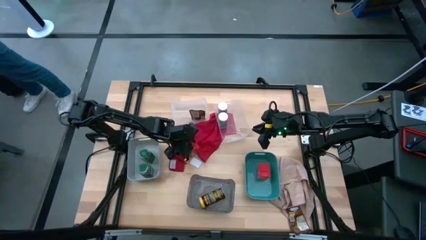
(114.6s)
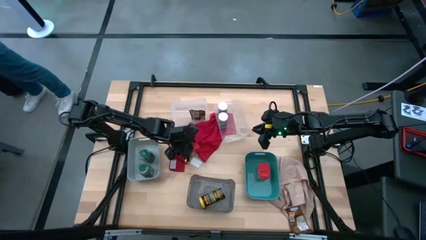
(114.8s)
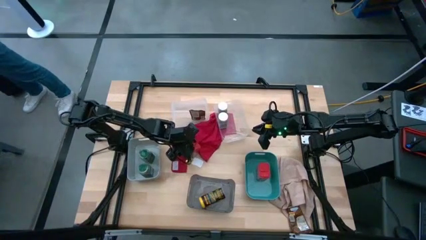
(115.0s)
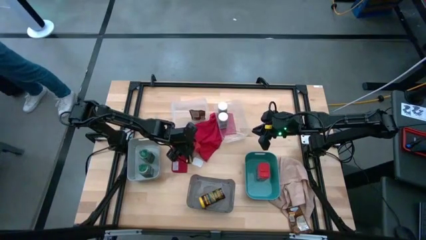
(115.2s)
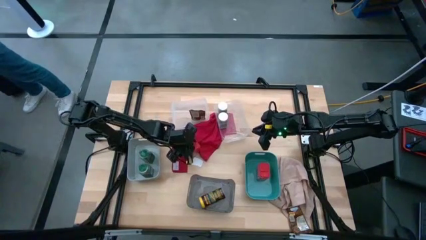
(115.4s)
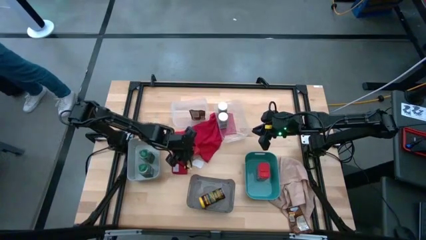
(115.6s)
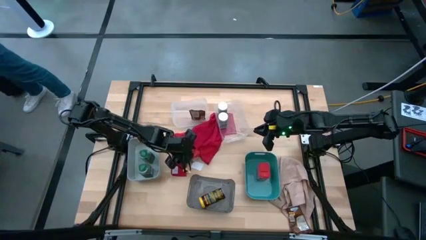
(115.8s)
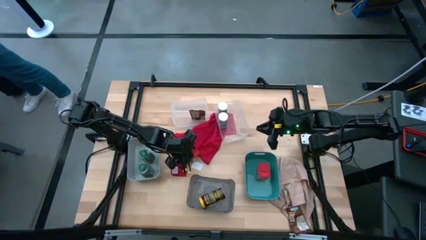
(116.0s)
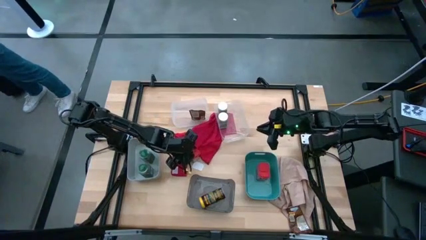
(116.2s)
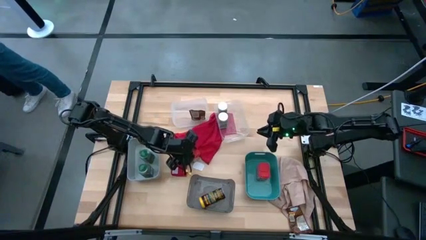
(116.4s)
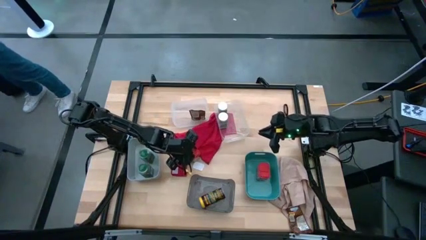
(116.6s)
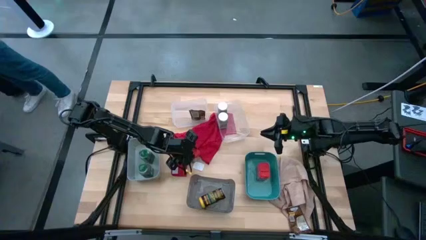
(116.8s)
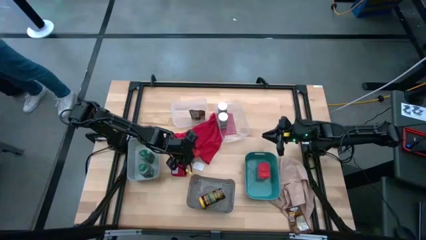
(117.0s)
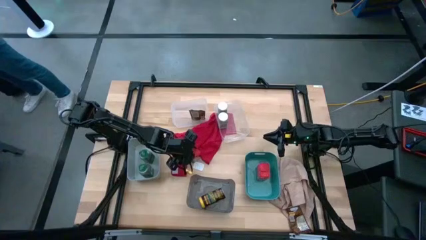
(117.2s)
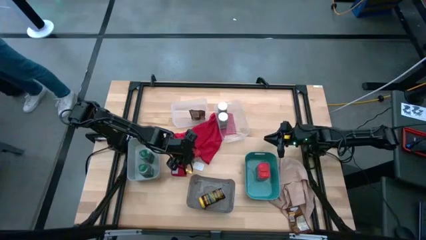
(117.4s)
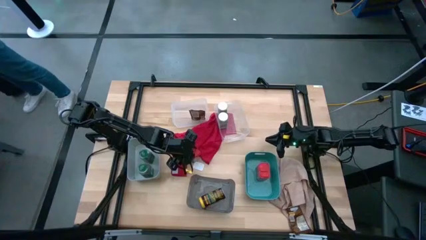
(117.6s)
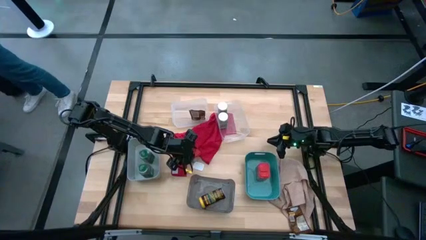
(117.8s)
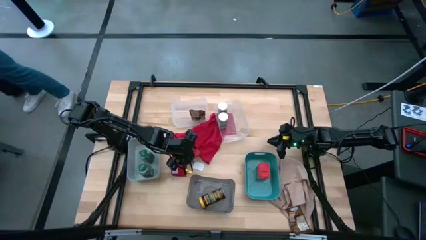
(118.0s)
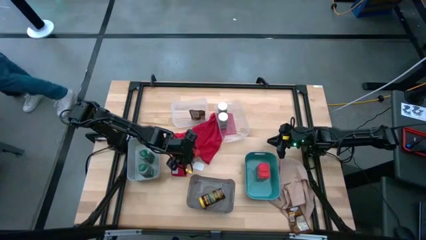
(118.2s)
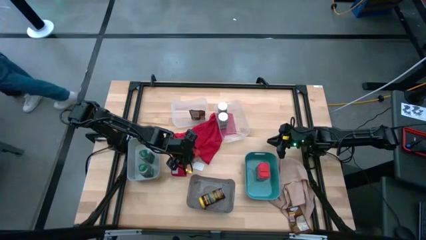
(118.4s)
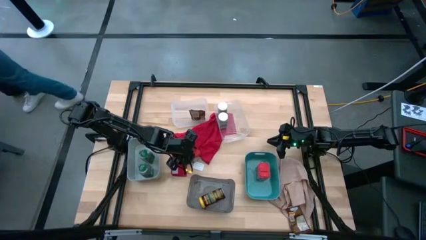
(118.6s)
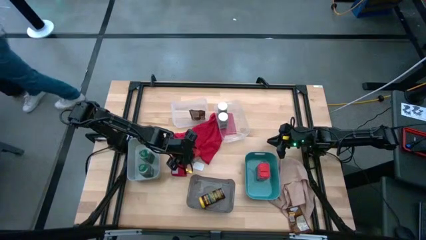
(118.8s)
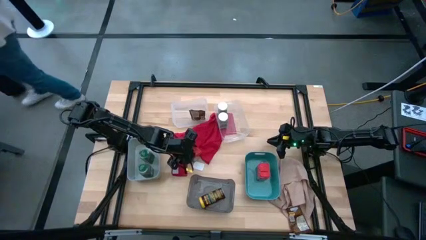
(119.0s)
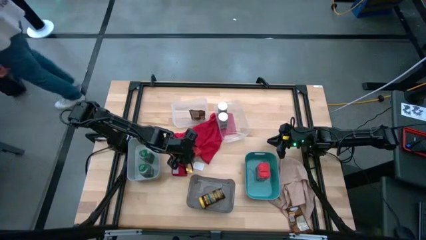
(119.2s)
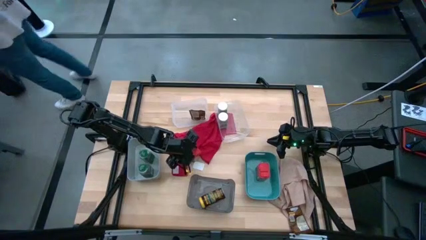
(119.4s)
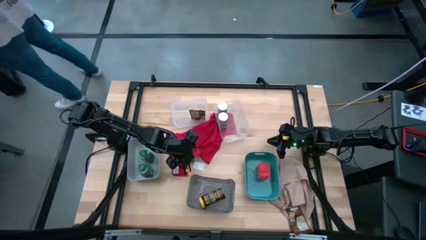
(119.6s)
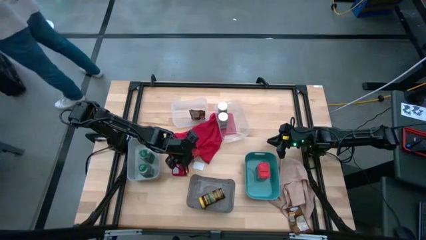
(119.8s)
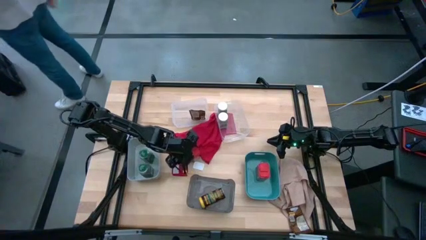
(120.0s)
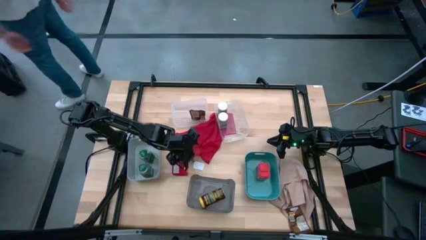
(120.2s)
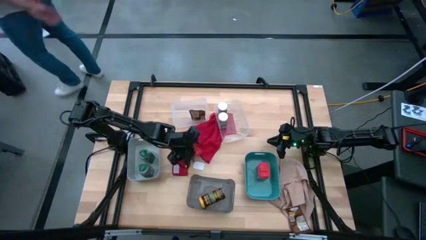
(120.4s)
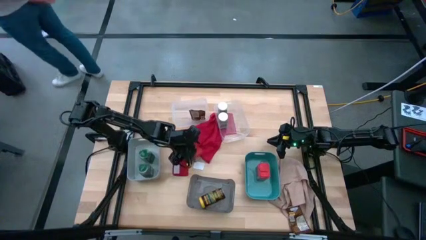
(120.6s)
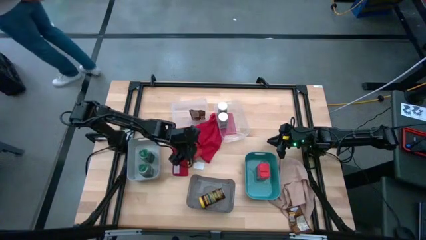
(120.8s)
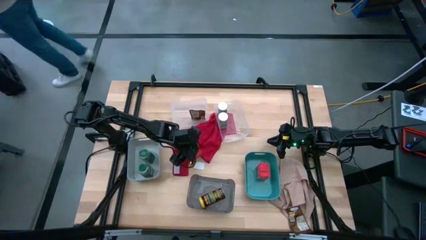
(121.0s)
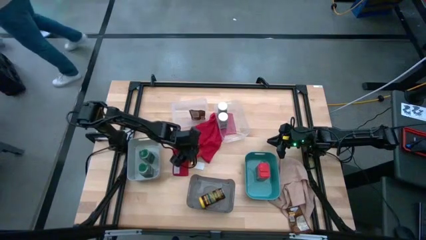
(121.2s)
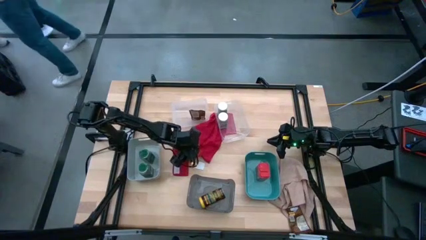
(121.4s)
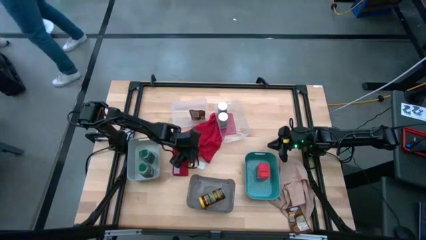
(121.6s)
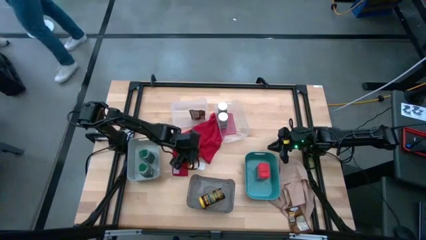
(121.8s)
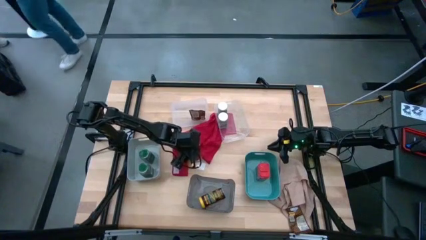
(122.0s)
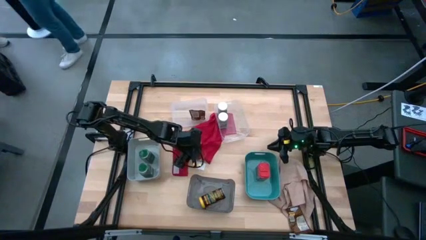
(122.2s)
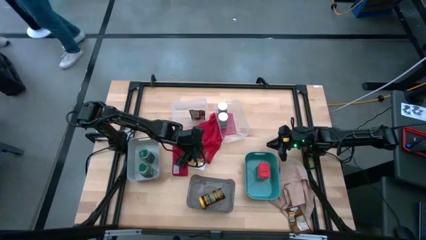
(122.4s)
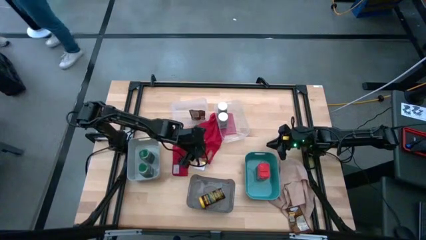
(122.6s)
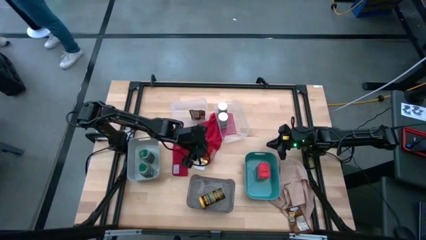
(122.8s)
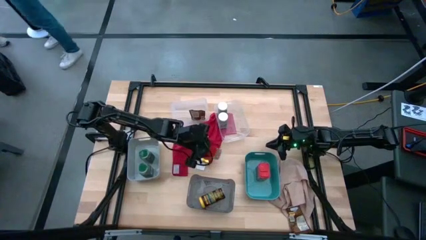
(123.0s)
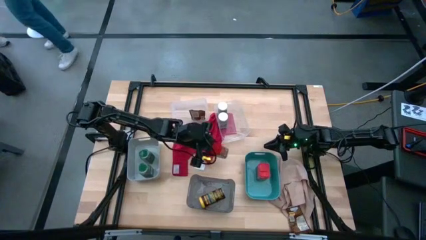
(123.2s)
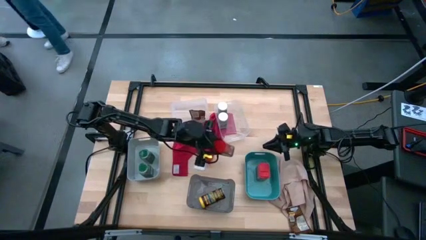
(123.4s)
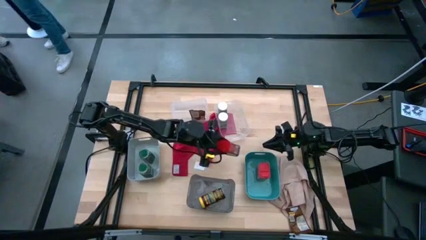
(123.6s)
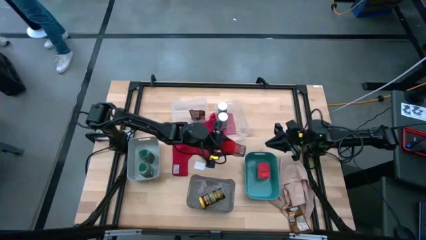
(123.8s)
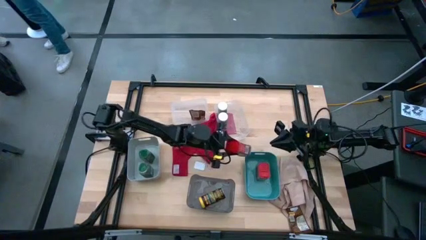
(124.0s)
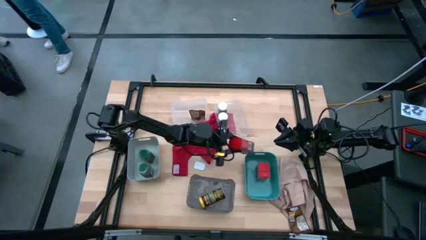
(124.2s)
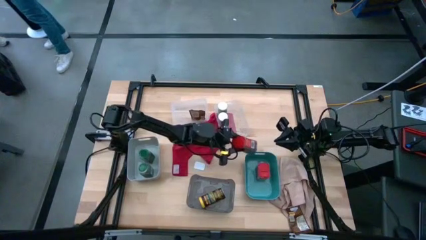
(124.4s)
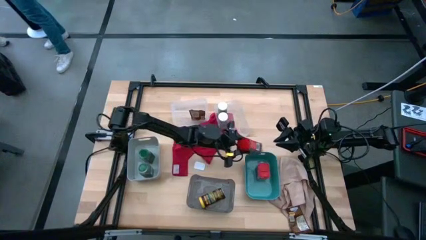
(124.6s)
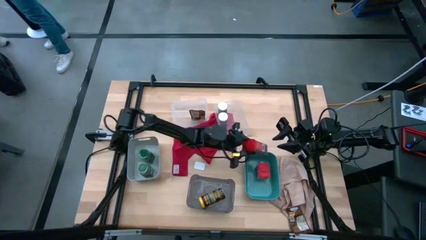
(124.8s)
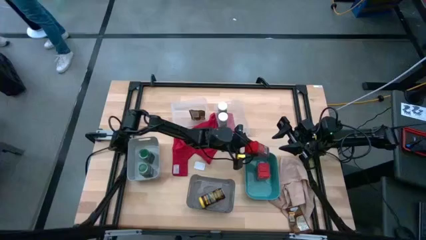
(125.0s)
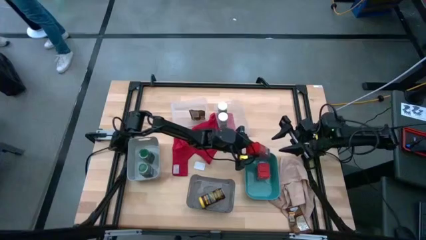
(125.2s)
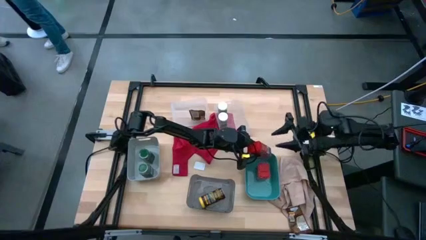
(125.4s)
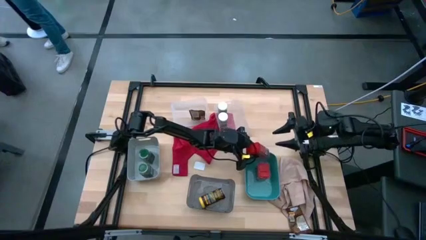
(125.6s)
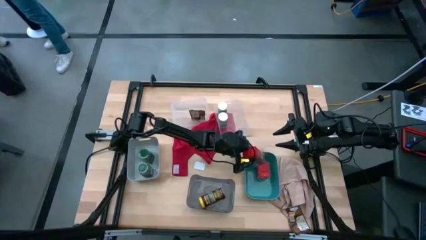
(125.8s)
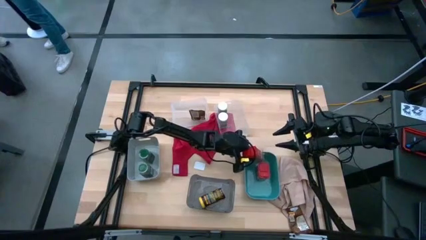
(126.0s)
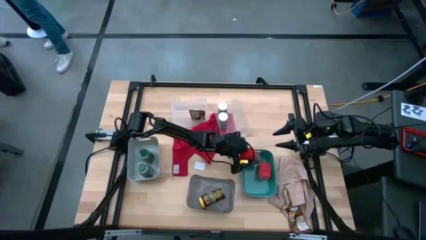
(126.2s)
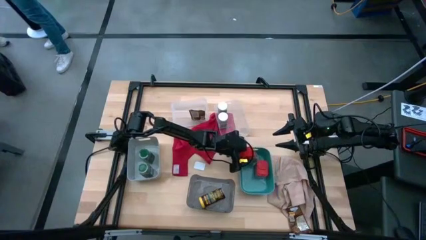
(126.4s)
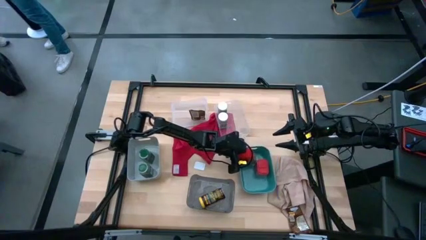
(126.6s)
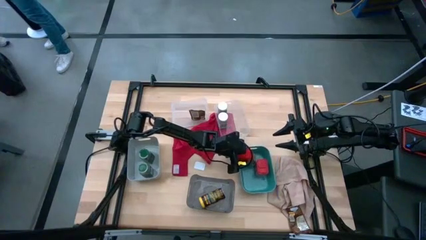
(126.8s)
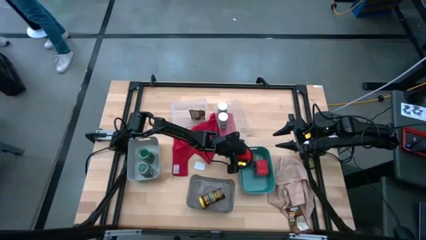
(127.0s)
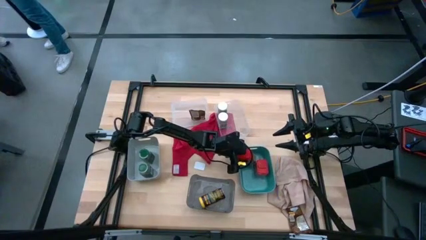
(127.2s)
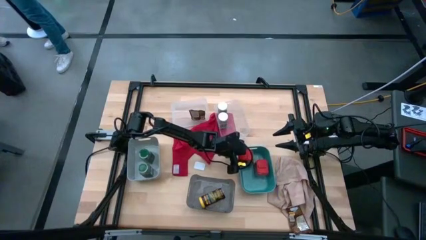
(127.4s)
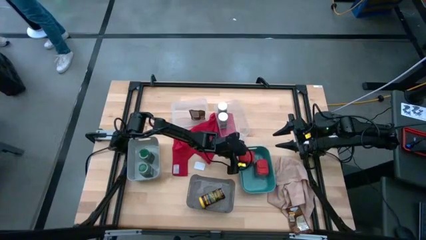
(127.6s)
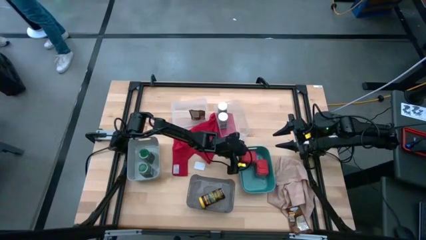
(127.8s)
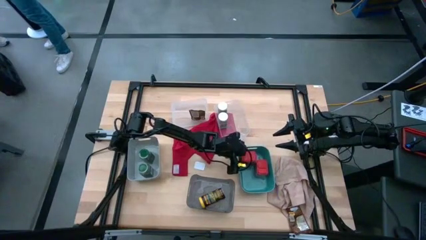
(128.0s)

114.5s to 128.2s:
Task: Sort spices by type
Put the red seasoning can into the green bin

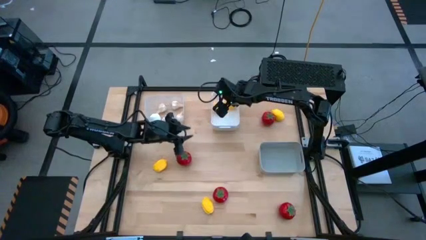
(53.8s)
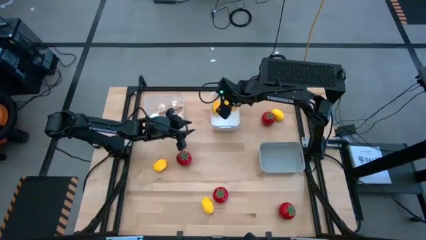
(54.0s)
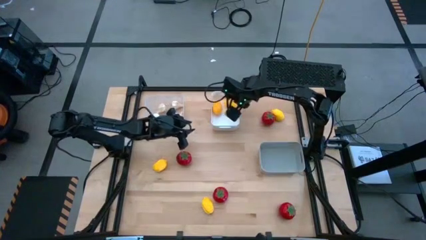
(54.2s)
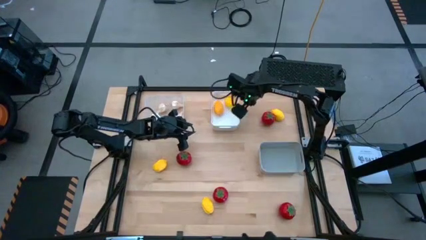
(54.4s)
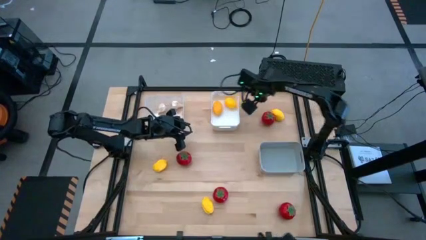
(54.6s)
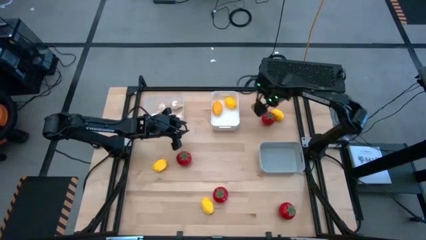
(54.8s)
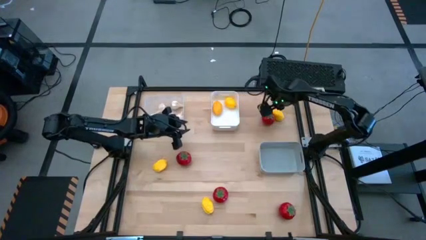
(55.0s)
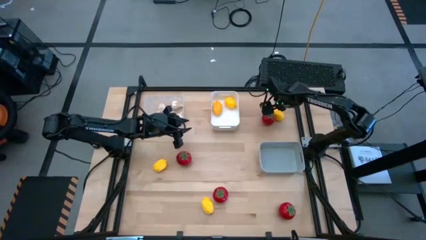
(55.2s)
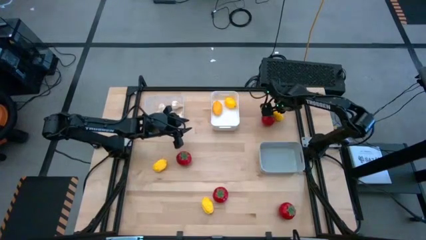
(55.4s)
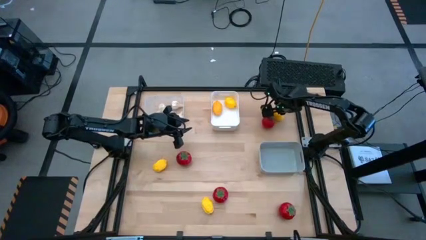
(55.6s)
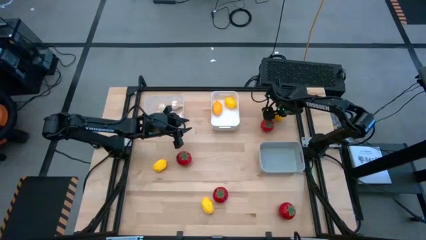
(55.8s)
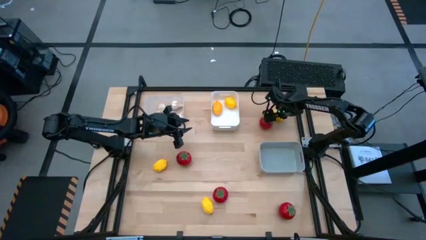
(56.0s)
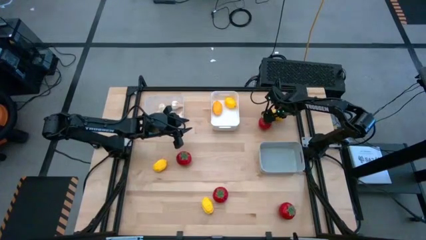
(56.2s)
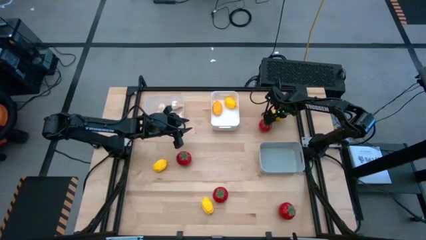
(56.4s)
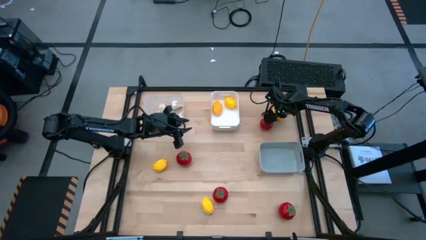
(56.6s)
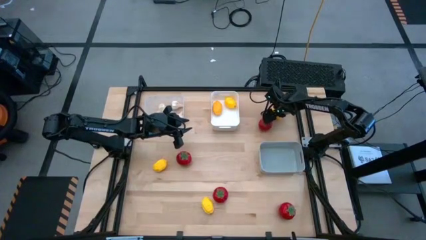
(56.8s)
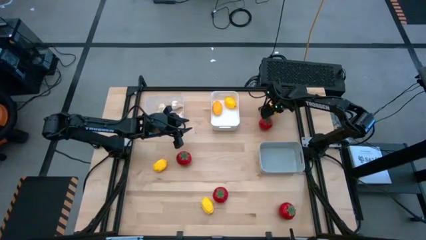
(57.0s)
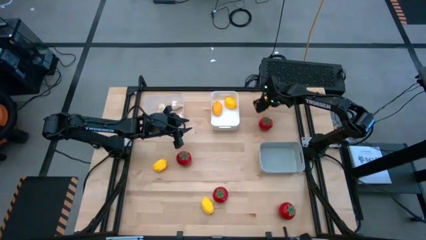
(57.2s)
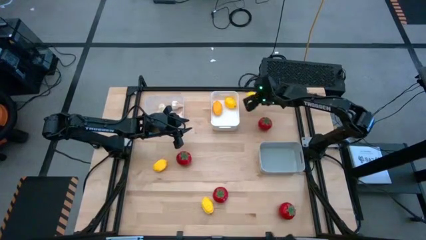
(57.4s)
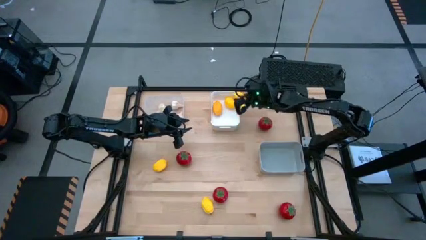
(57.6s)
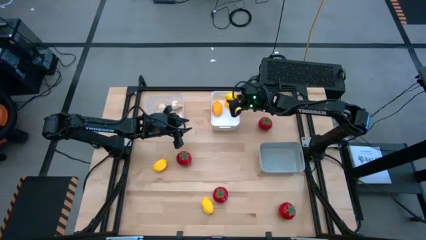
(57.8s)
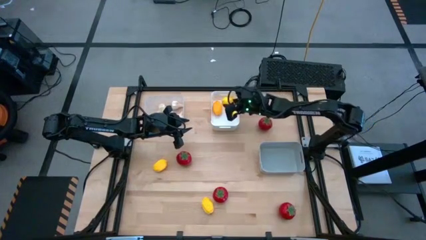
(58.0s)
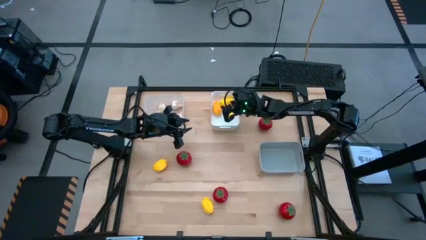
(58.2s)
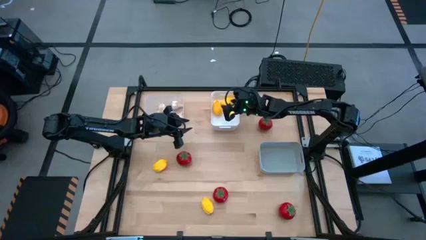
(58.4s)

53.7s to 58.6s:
Task: Sort produce into baskets
Put the lemon into the white bin
